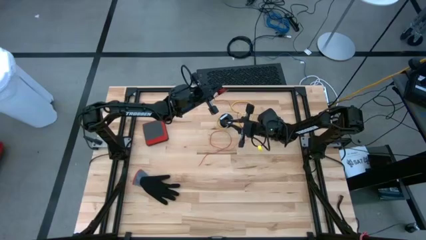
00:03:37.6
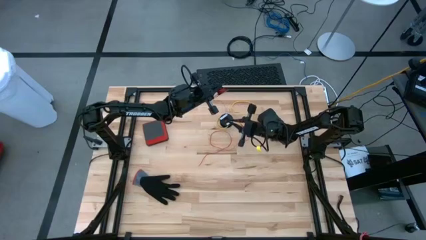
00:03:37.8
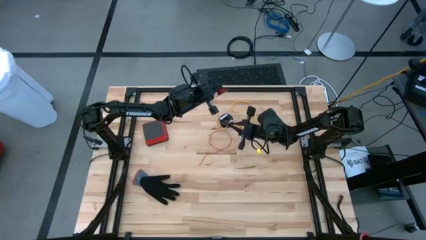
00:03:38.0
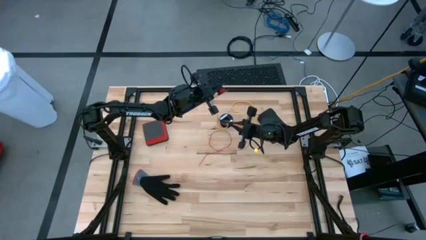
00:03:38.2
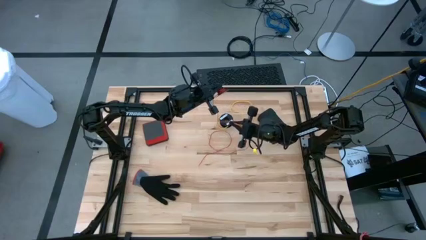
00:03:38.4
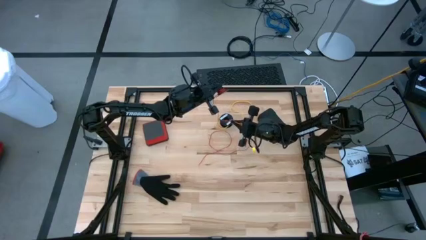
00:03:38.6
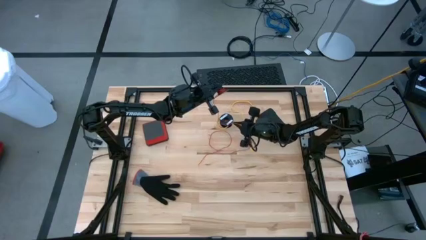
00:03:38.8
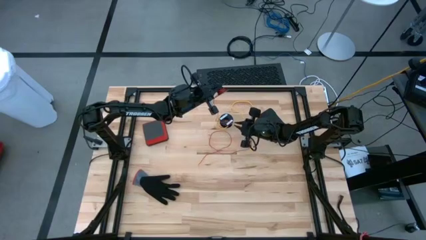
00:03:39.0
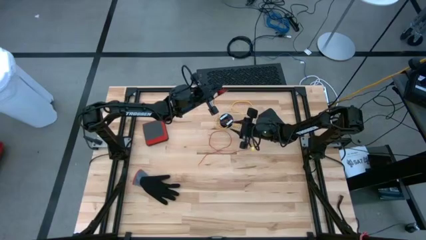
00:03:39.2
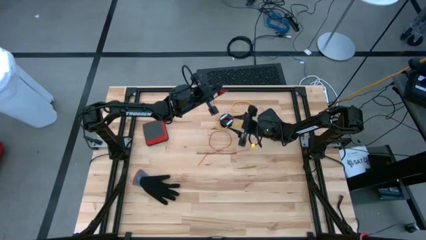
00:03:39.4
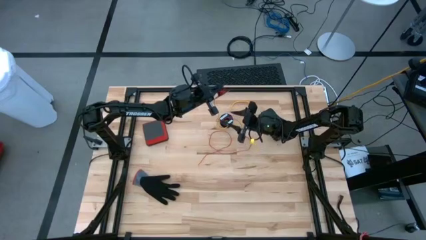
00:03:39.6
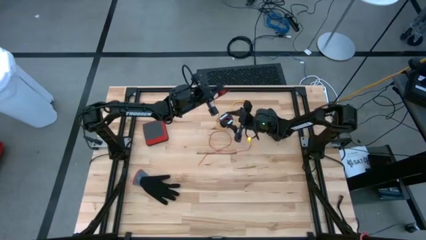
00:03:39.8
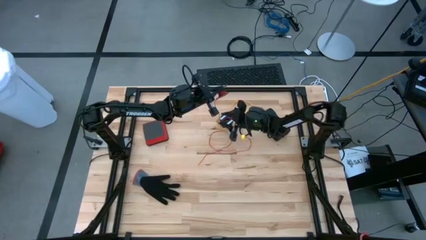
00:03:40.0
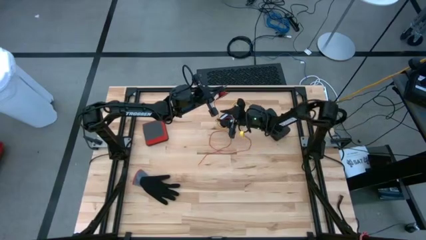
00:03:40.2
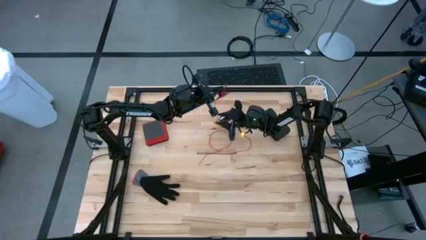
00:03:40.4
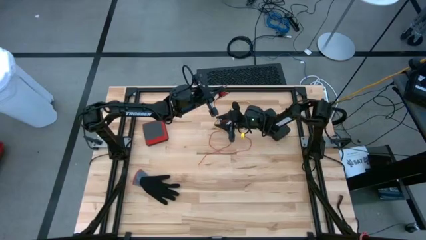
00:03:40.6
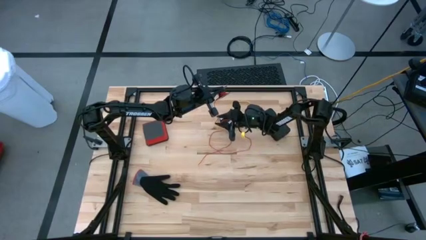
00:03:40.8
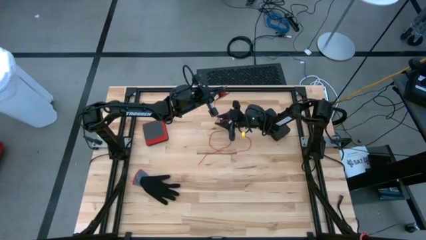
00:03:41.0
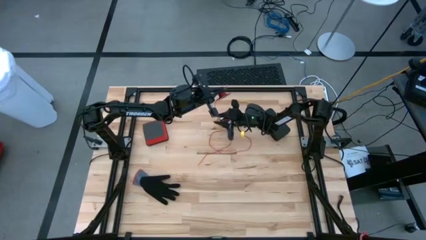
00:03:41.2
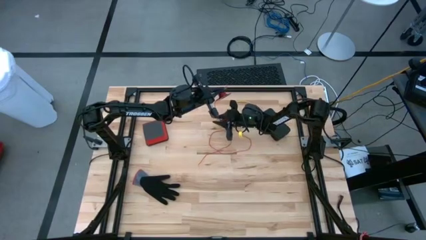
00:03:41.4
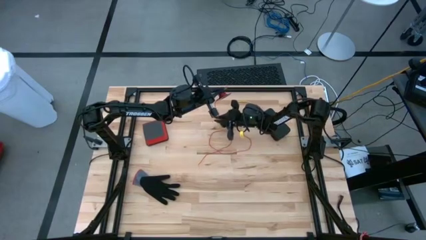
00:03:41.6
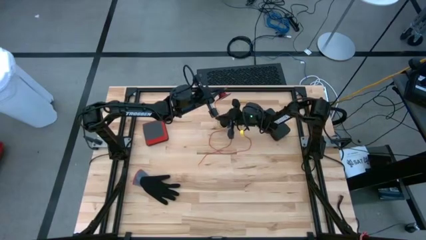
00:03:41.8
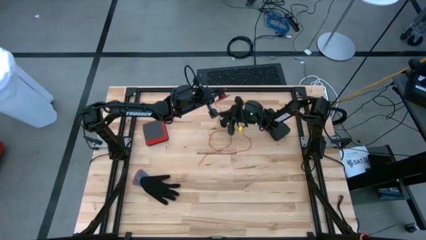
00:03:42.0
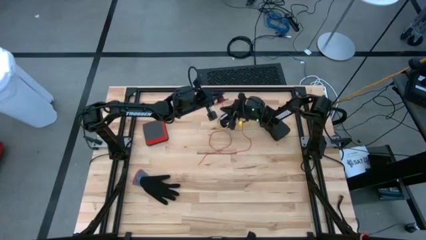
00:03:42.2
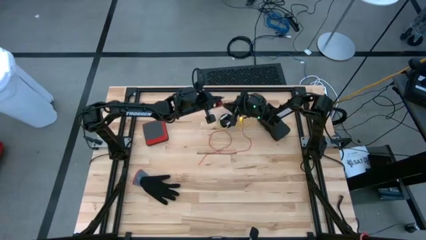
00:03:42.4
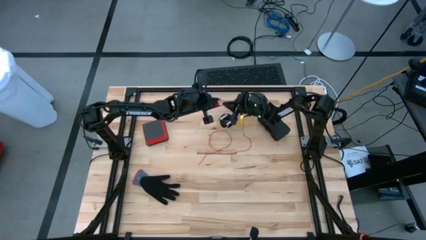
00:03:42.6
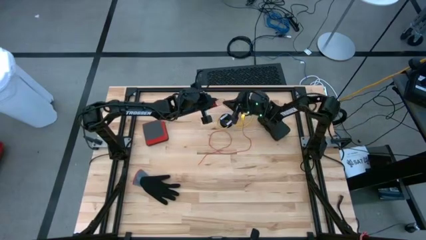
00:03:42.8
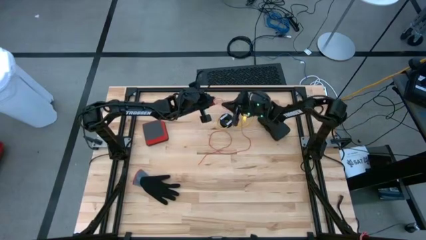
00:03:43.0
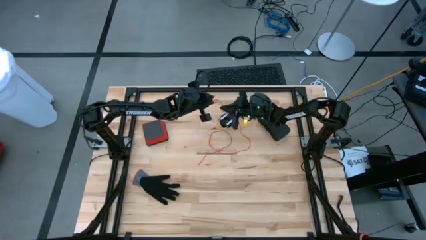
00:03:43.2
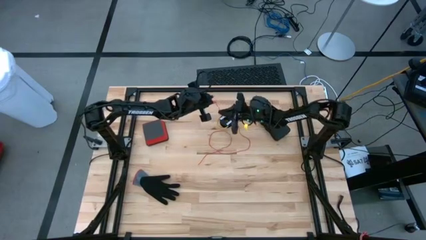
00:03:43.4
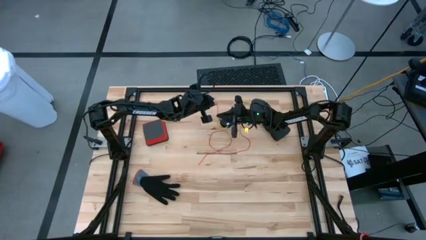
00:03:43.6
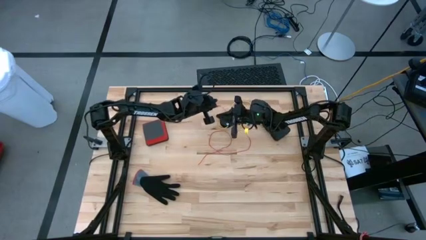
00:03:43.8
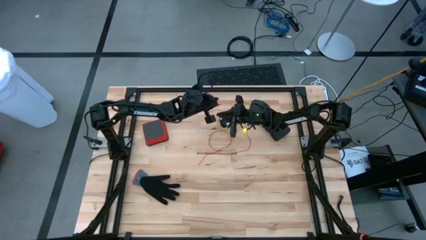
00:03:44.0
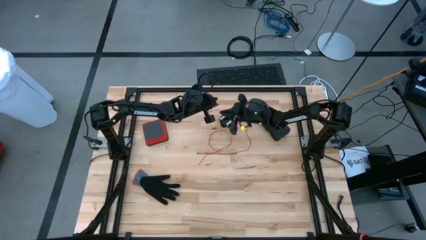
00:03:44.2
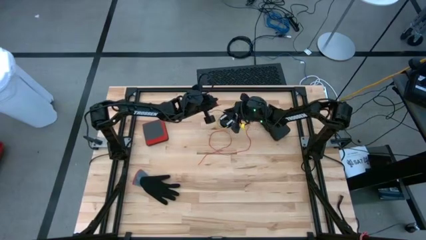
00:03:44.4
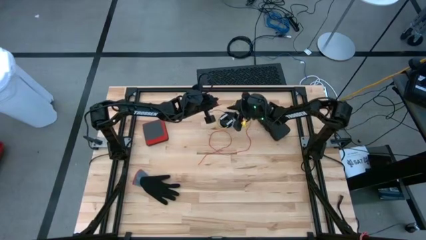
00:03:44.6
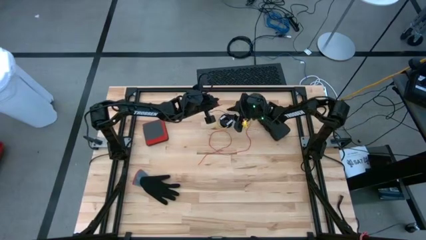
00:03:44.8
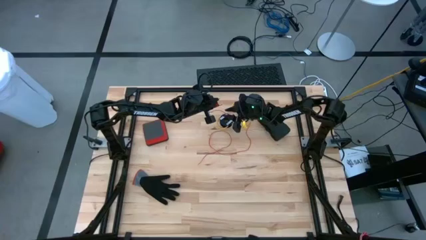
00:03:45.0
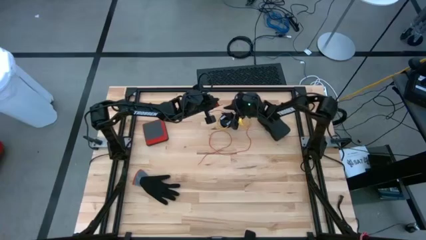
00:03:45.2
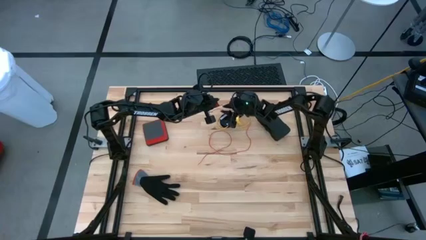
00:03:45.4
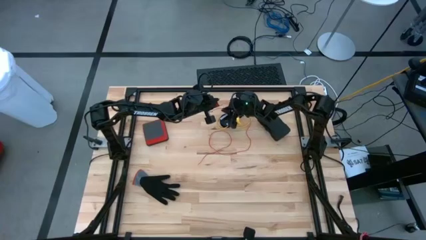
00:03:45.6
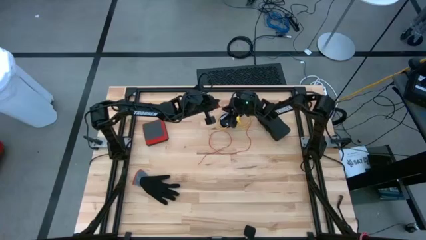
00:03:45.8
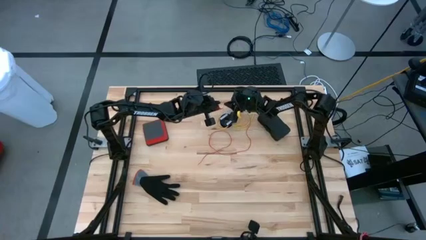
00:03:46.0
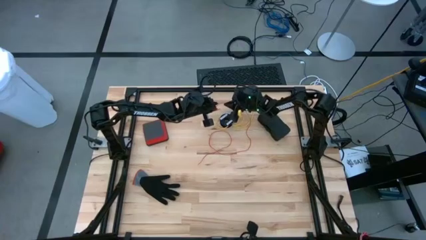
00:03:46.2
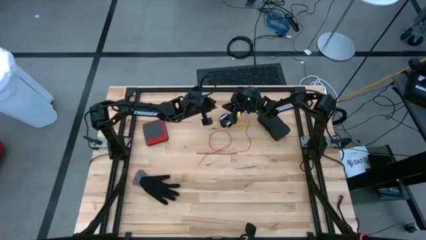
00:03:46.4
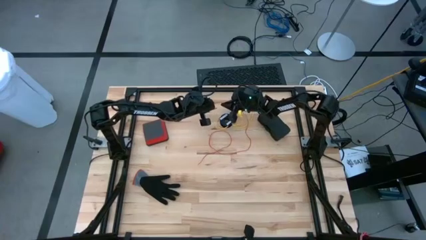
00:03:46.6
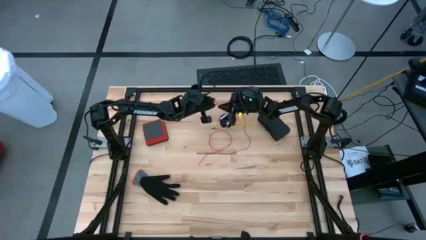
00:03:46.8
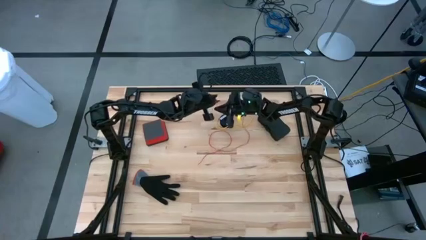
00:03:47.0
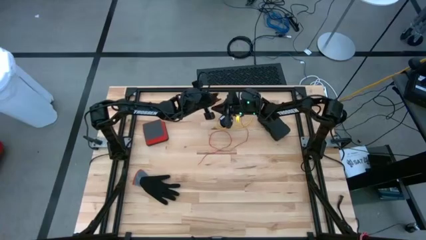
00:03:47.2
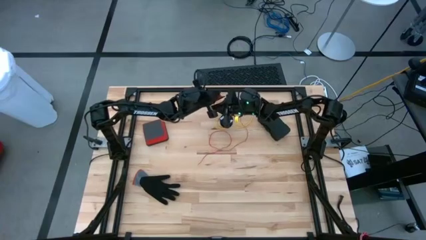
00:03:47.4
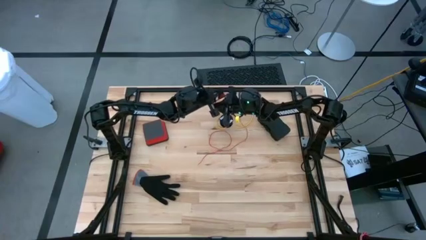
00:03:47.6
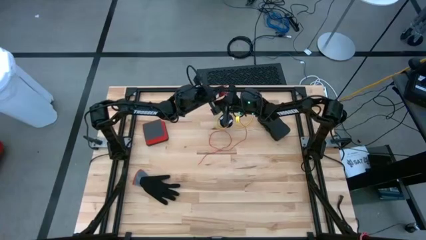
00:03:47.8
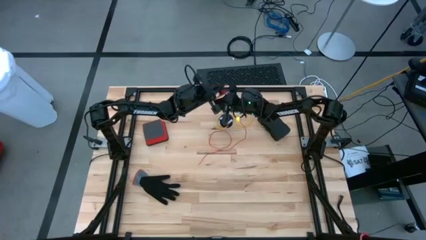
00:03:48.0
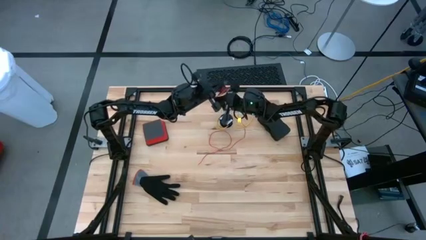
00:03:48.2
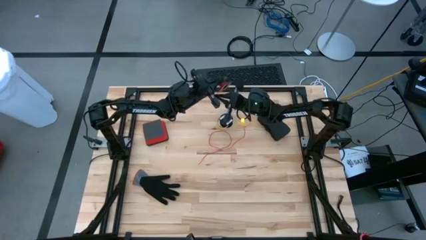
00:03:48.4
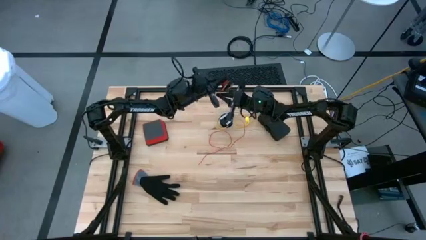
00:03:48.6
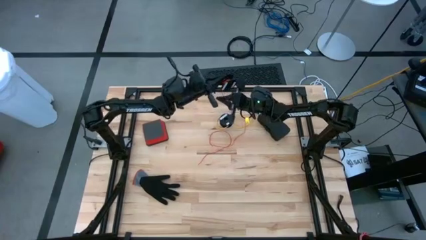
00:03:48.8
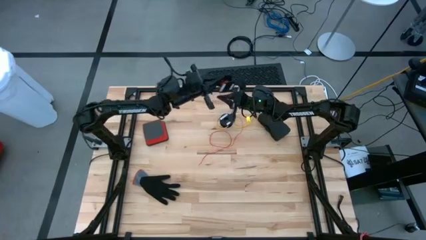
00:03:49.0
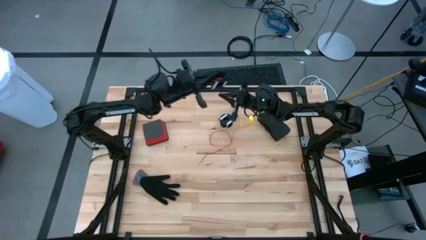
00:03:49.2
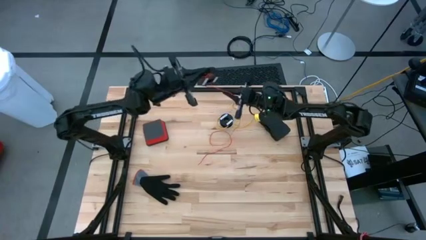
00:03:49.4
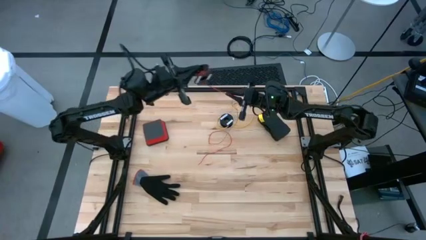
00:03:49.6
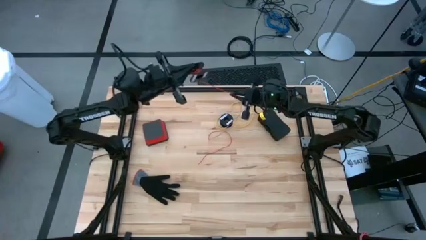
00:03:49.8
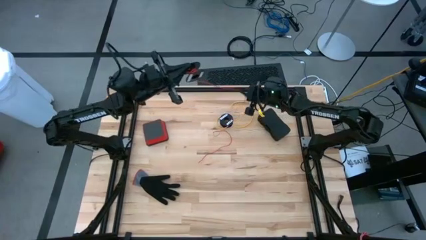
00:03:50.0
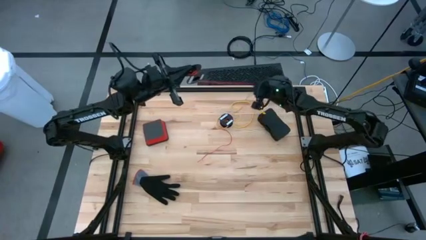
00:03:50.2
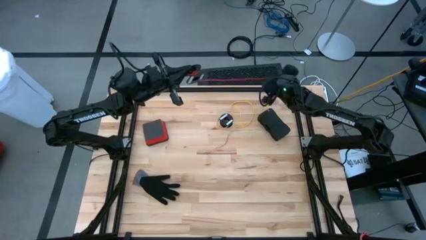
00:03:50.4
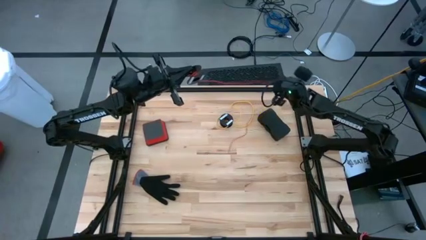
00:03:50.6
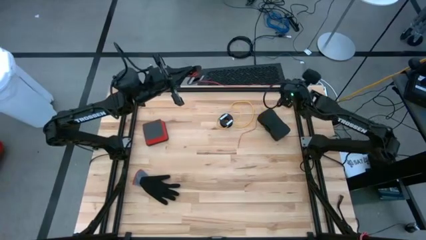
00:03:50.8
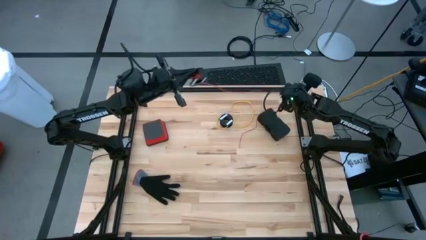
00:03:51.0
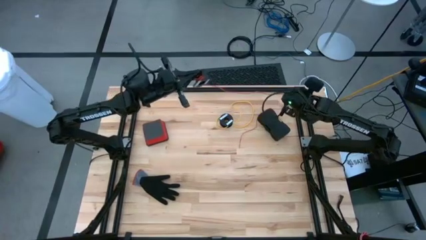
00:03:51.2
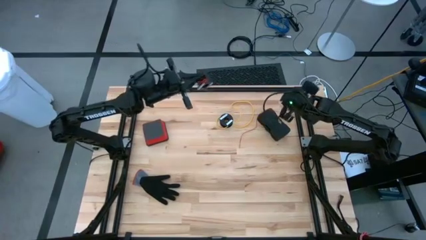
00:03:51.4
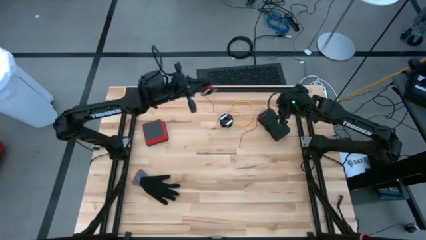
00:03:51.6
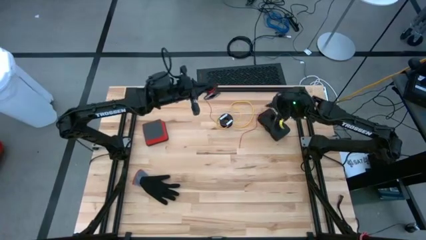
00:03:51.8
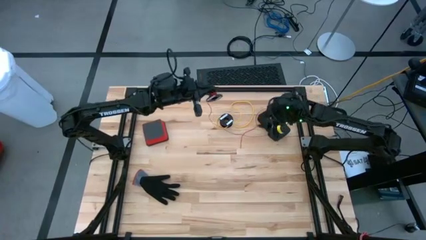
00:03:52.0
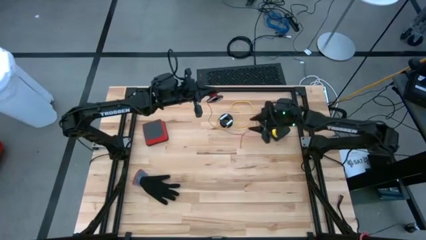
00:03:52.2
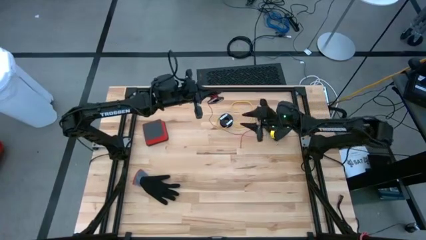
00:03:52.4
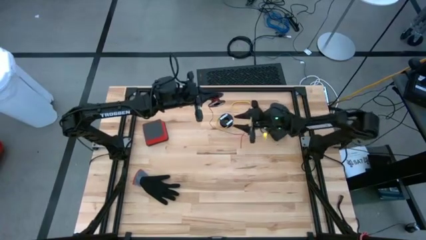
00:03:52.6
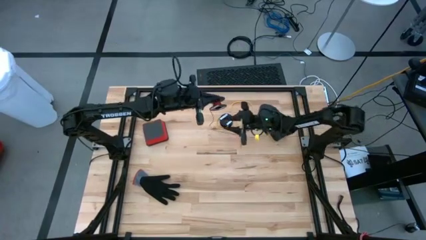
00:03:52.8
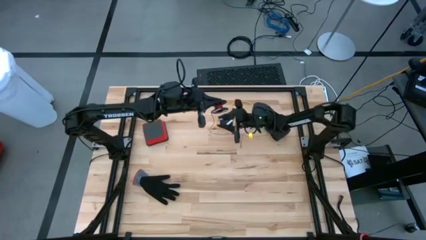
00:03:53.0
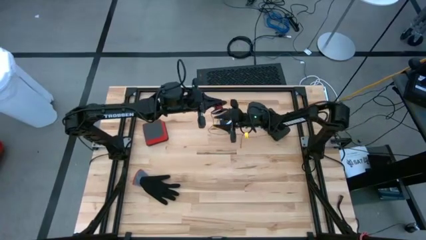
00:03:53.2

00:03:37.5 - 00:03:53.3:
Task: Coil cords
Coil the red wire into the spool
